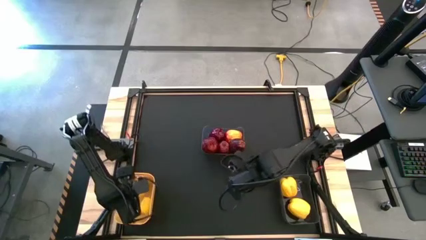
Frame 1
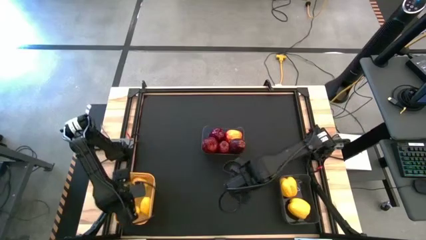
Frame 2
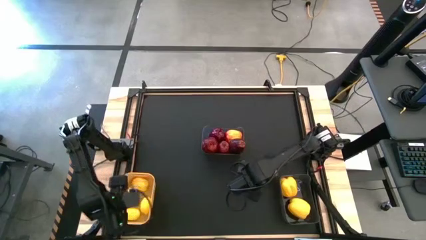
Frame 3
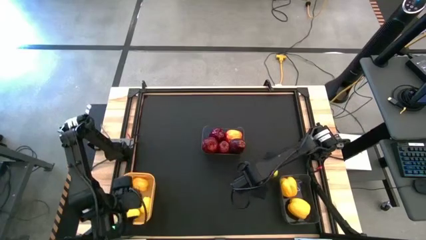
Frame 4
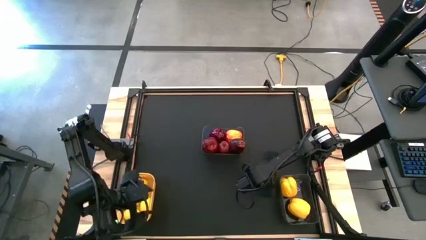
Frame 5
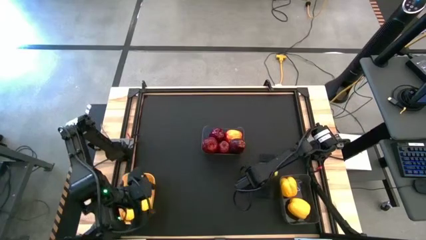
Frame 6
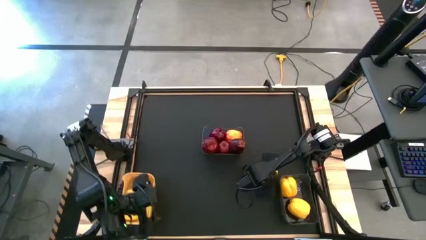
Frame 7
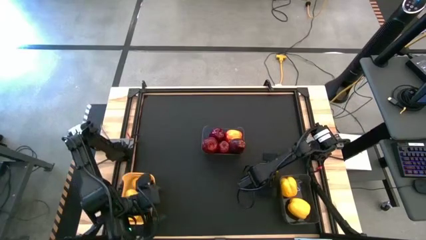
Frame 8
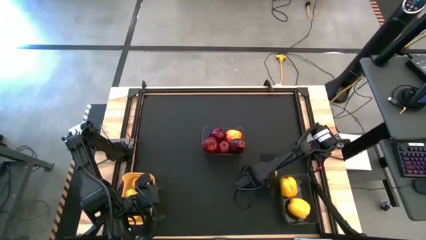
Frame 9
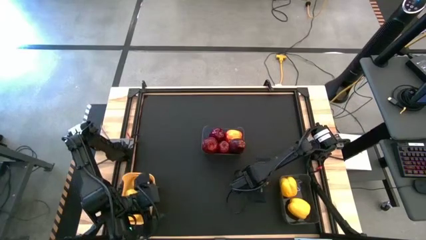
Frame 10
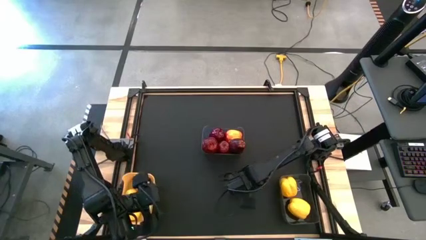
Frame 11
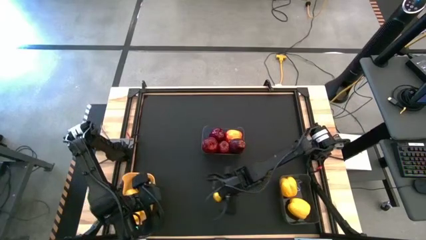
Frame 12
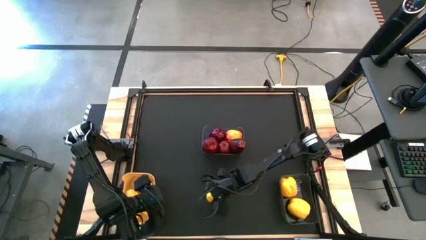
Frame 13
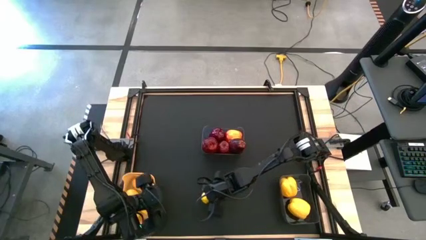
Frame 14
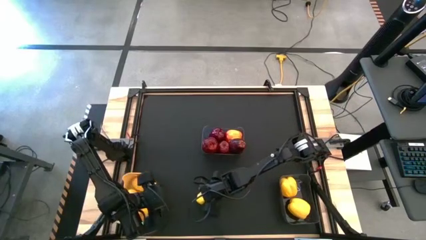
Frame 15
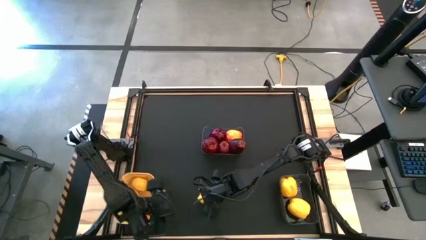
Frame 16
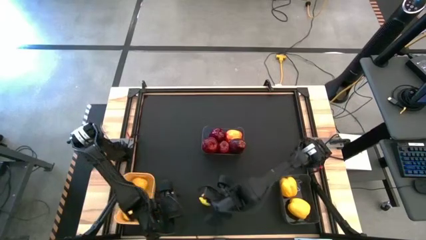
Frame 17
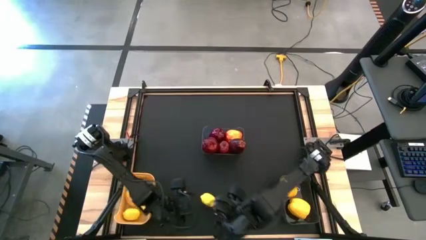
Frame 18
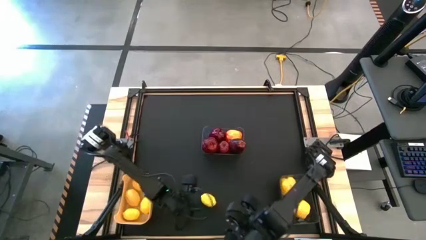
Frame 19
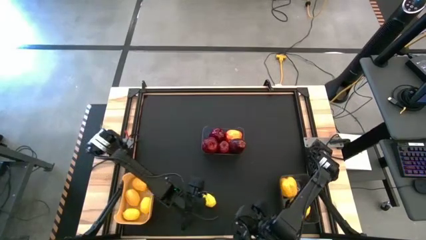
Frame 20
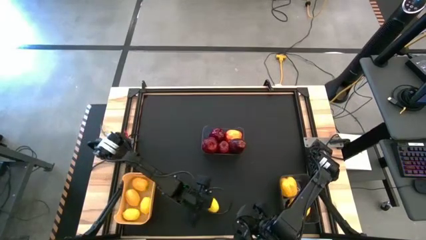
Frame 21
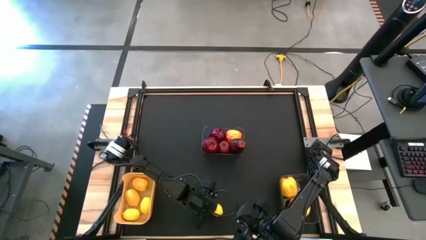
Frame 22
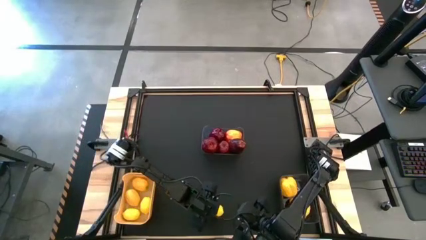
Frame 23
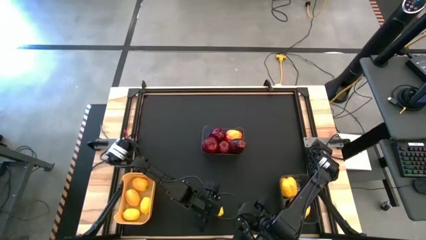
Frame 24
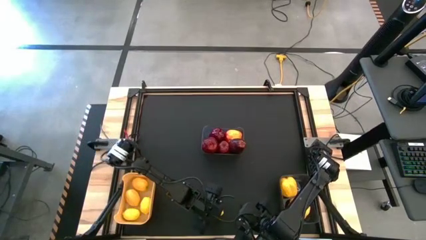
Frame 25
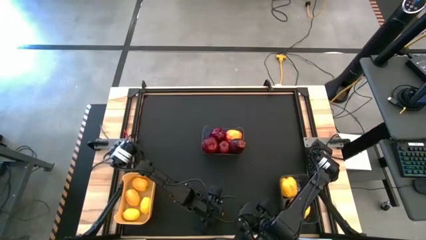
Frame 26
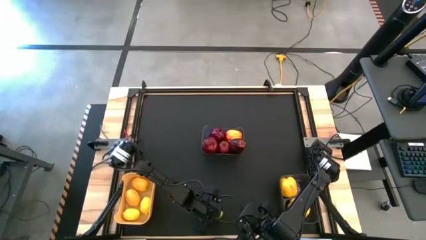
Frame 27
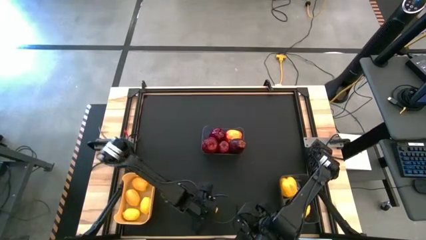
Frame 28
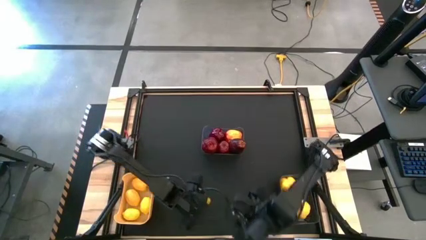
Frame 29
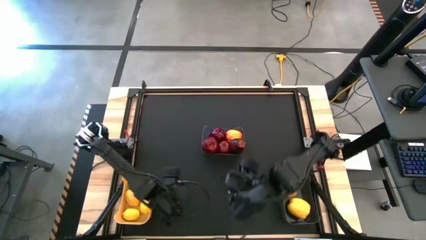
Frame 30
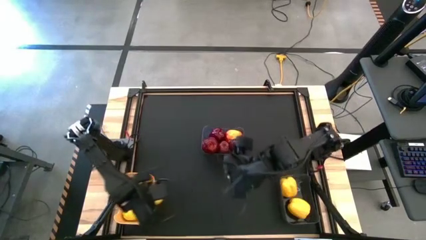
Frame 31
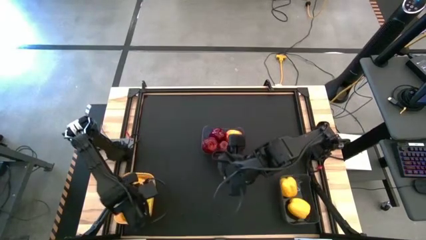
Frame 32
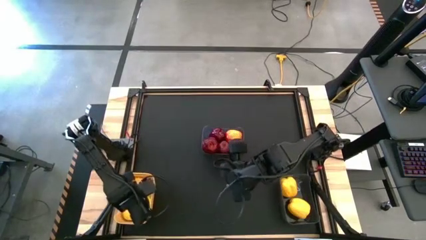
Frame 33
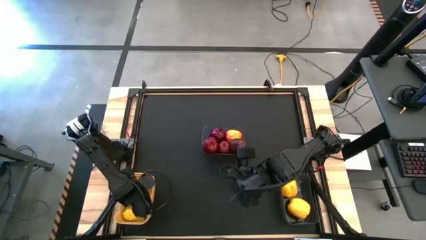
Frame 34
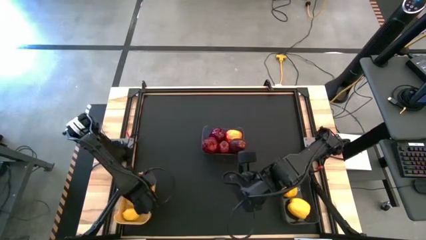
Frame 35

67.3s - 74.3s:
Task: Sort produce into baskets
Put the yellow lemon into the yellow bin

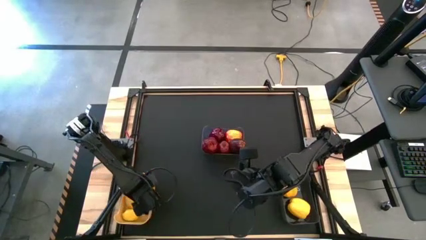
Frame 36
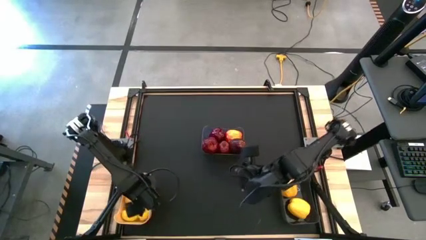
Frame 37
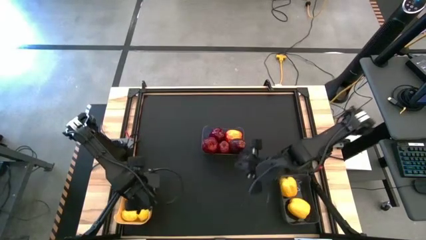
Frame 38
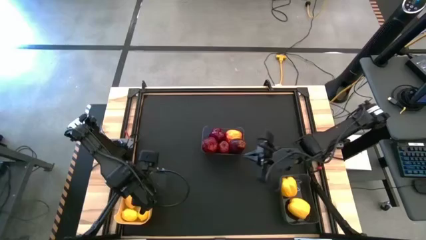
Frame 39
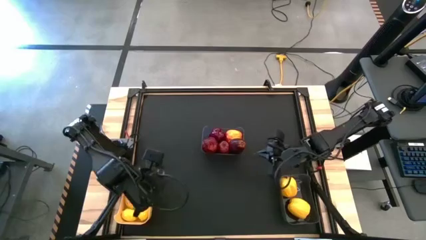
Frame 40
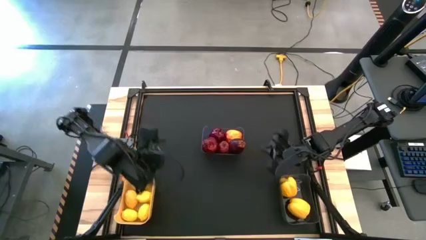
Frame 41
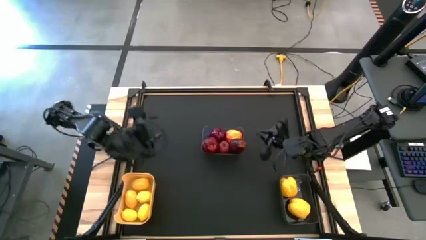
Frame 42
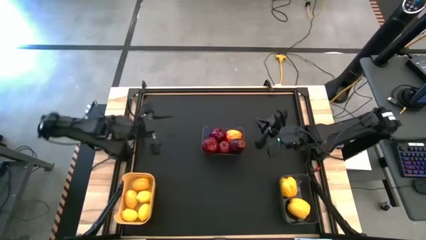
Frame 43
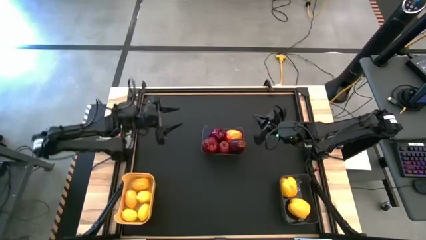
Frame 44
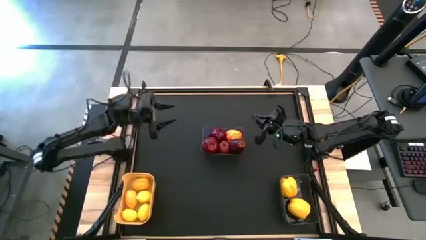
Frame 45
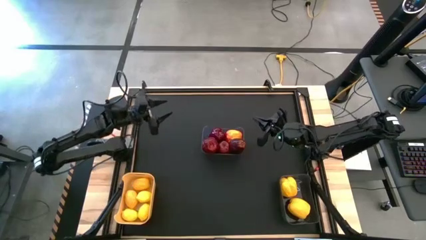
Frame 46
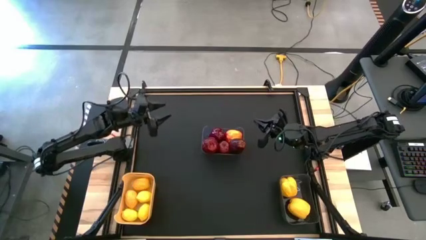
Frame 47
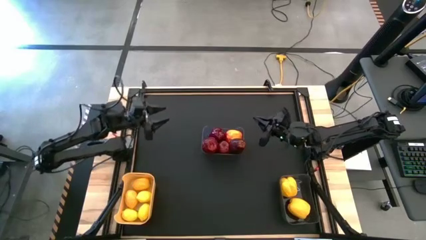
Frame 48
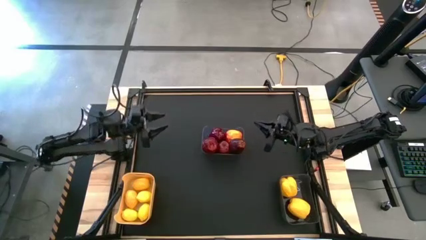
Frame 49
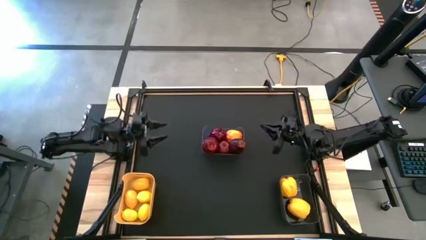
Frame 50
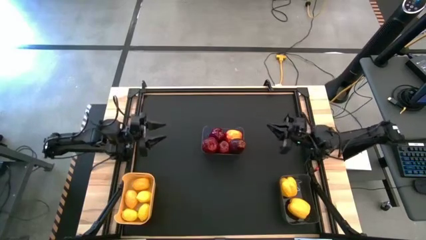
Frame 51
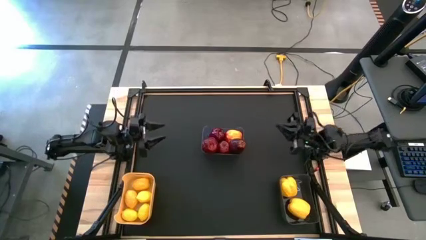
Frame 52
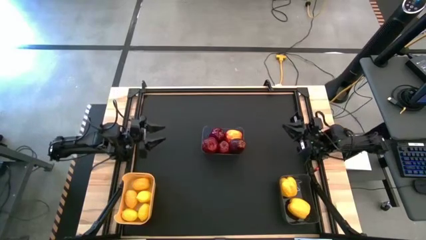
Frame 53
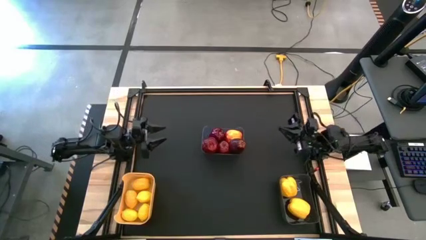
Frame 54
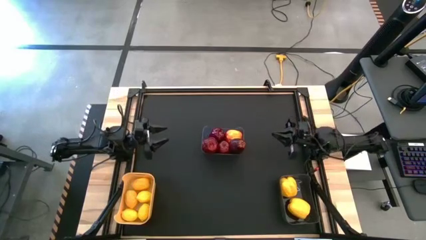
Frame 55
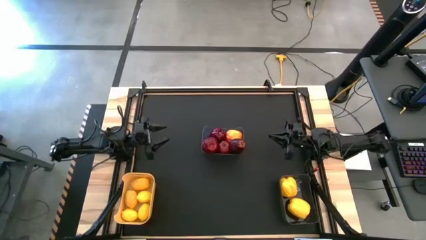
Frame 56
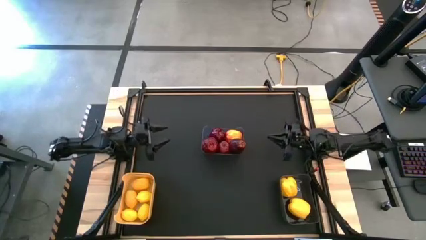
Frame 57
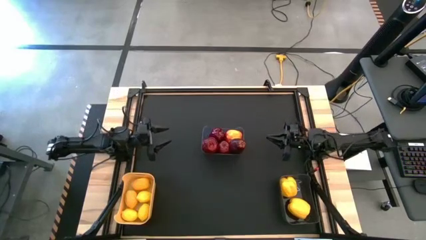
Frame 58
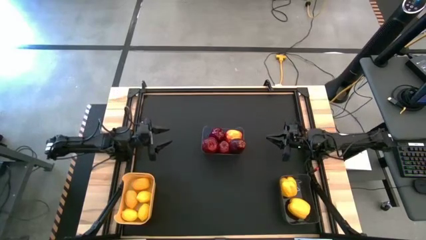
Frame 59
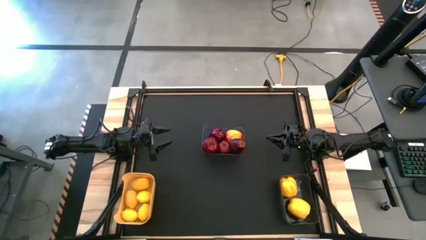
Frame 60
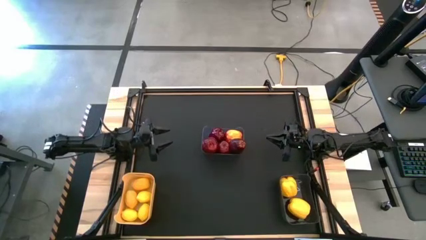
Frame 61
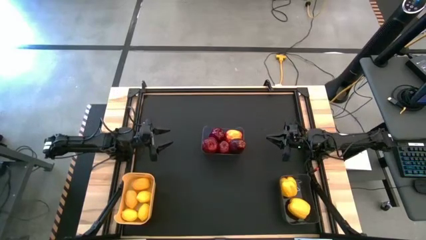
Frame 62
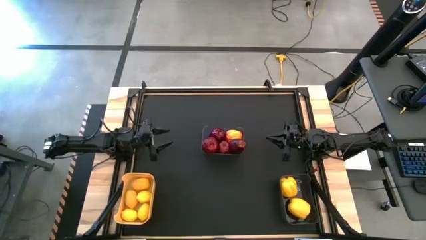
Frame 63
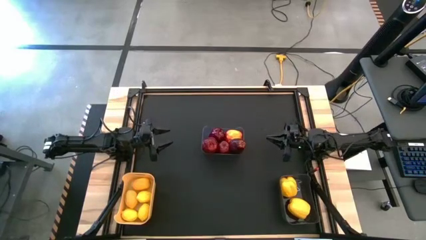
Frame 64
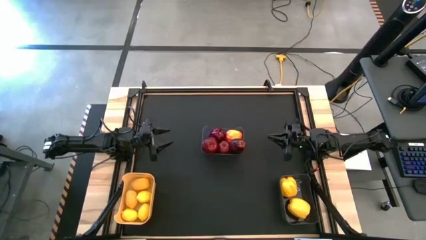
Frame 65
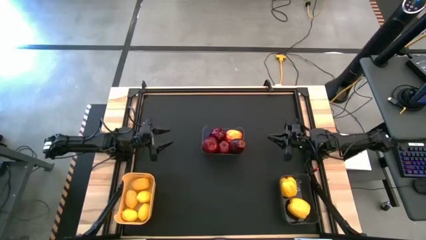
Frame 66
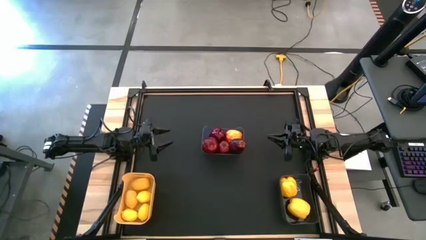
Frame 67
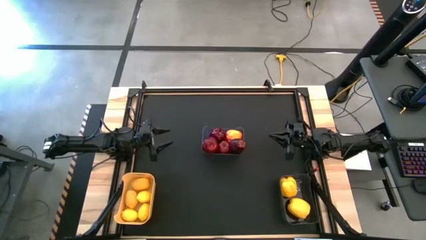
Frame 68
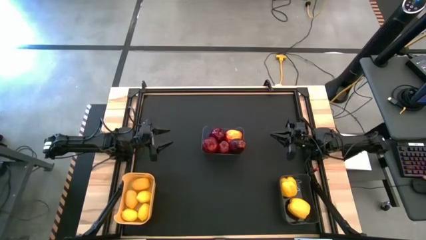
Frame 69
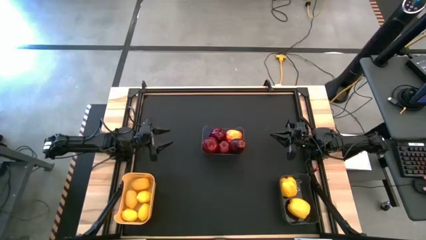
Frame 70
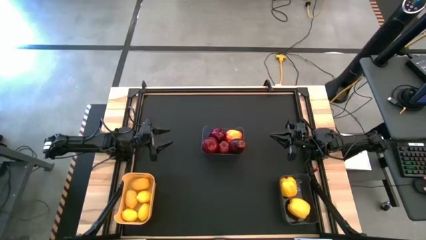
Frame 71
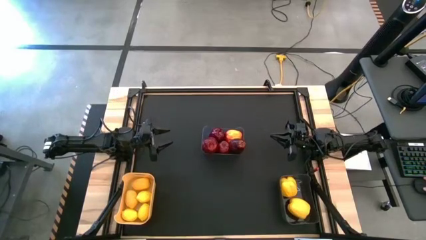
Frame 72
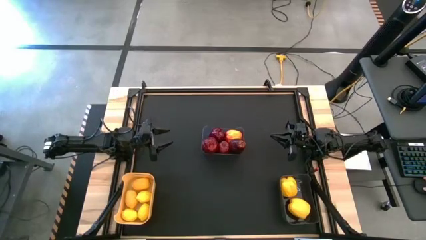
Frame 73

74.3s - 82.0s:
Return to Home Position
